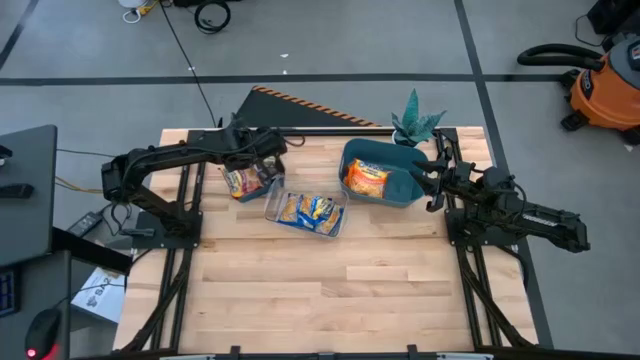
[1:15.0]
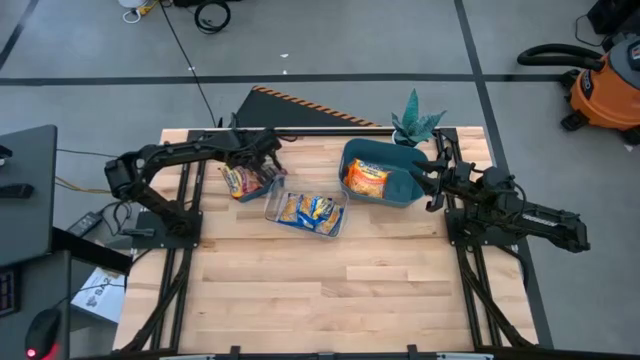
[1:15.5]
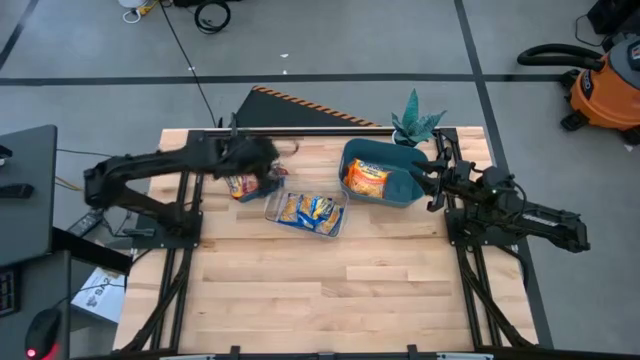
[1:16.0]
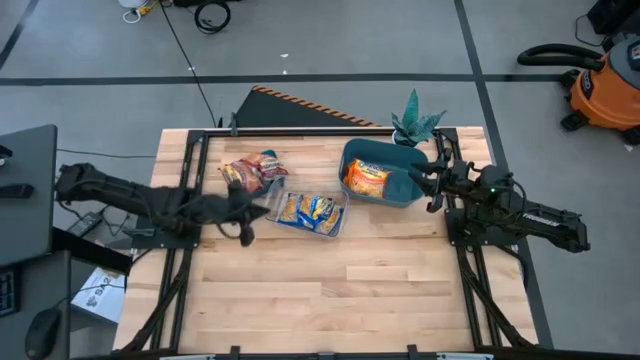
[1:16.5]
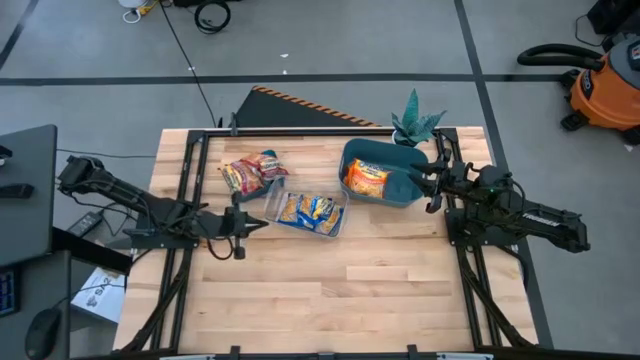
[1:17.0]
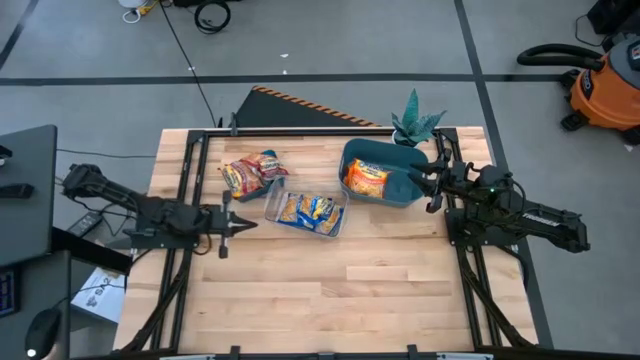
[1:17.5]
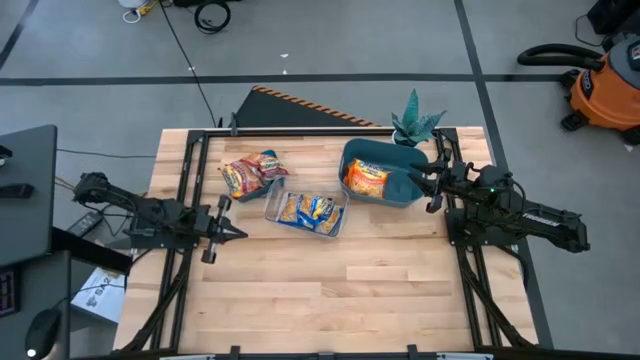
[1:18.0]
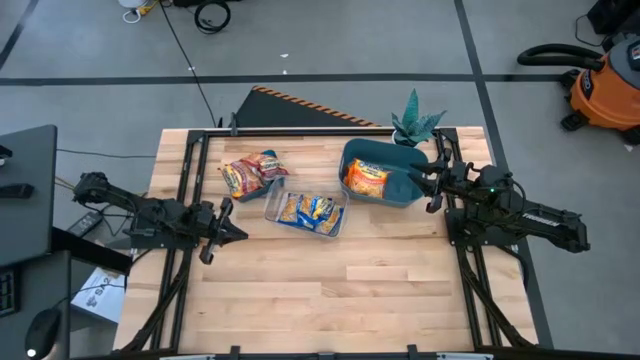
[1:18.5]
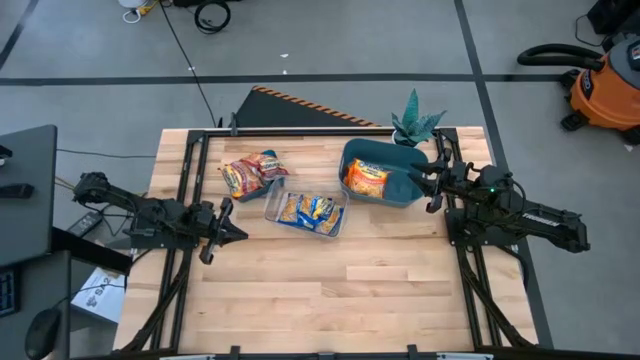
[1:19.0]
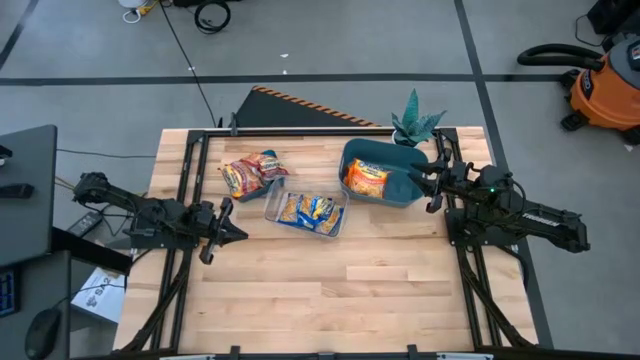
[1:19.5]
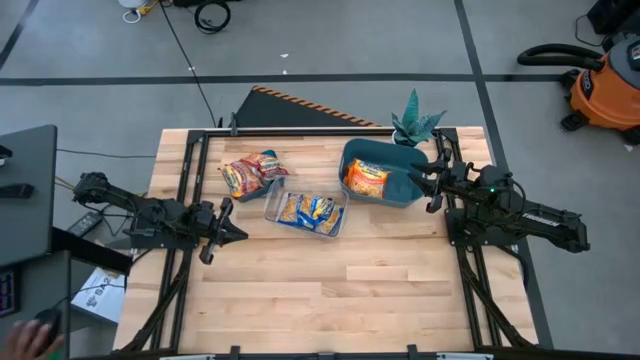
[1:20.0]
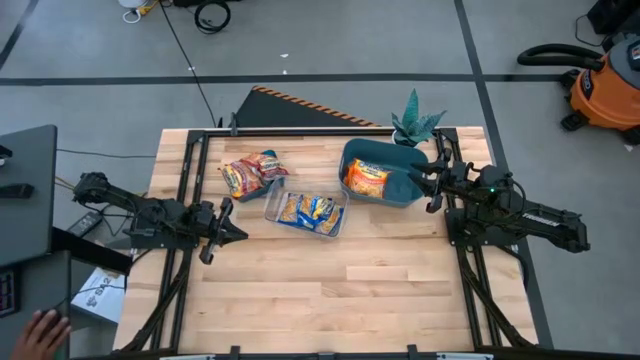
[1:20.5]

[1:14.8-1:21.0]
Task: Sort Maruchan noodles
Return to Home Position

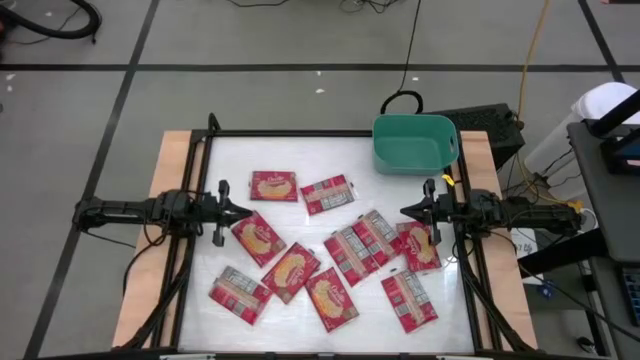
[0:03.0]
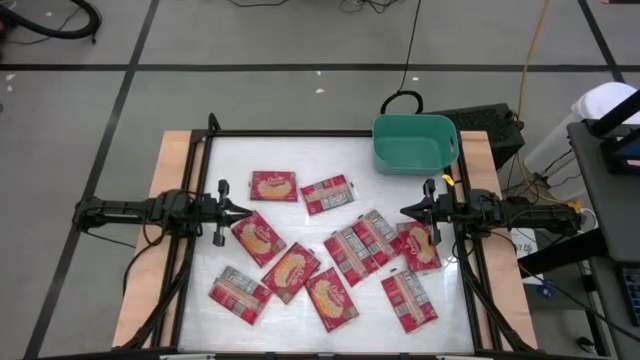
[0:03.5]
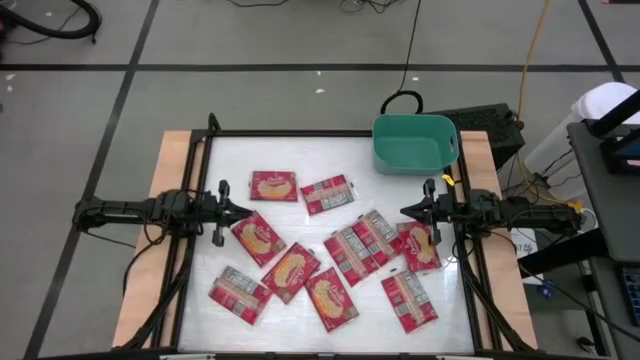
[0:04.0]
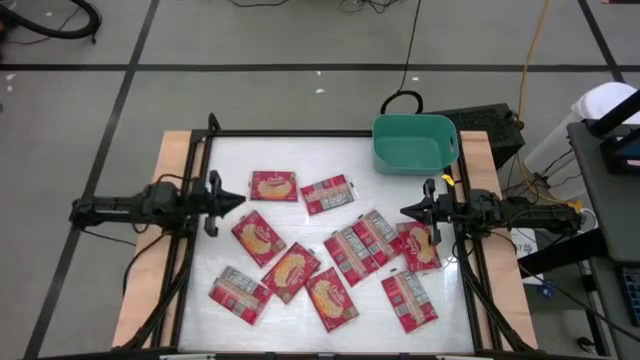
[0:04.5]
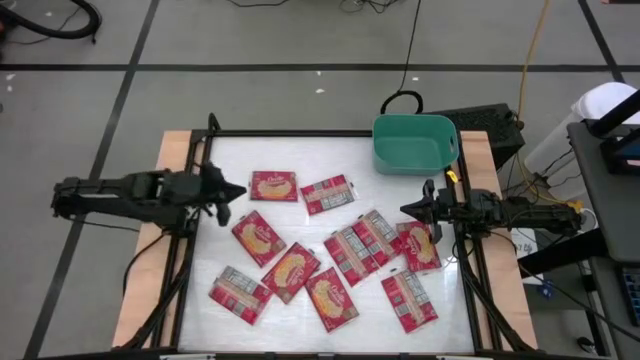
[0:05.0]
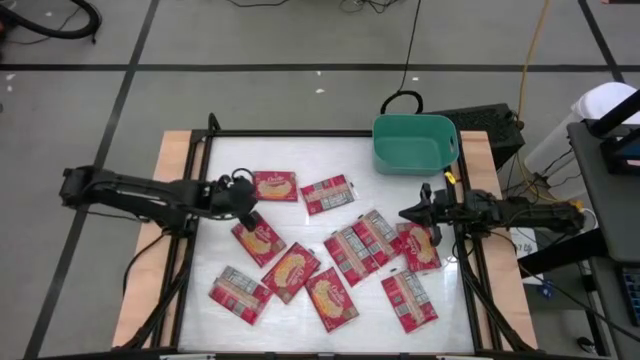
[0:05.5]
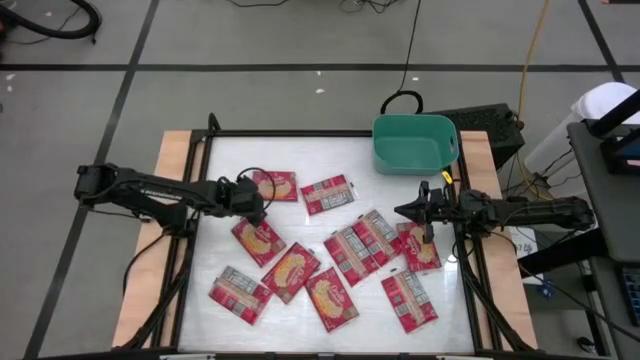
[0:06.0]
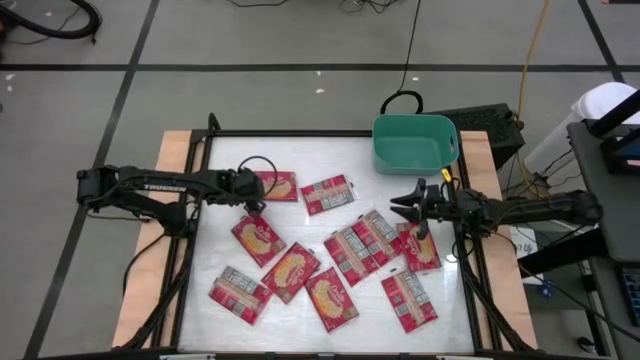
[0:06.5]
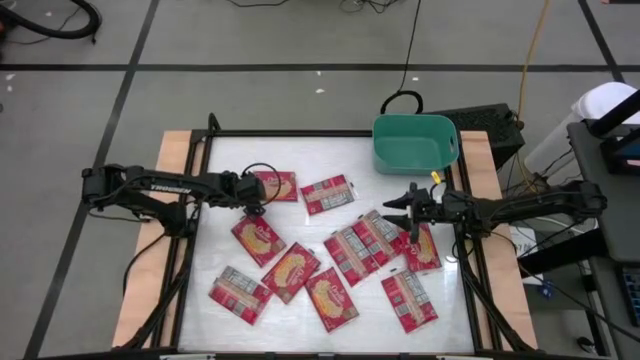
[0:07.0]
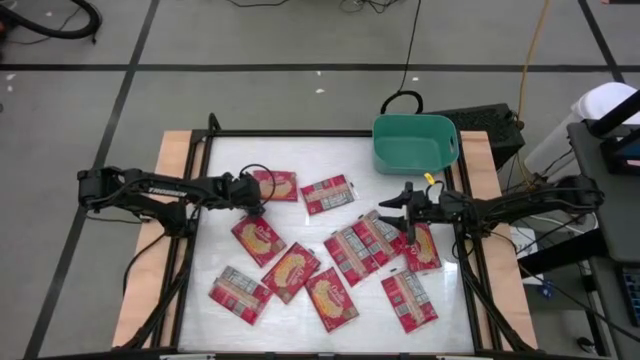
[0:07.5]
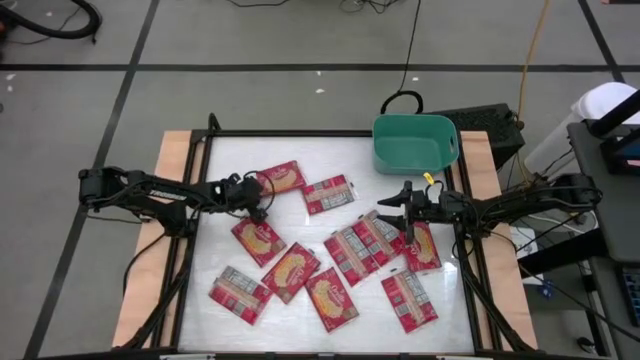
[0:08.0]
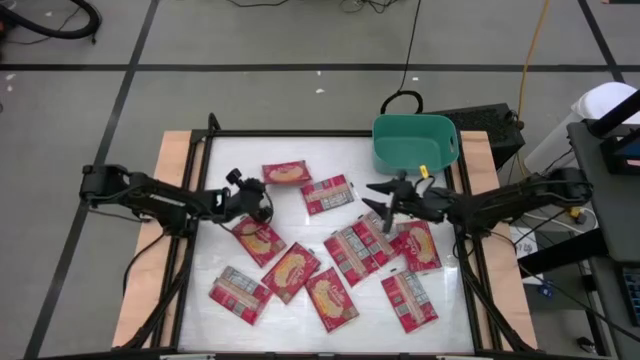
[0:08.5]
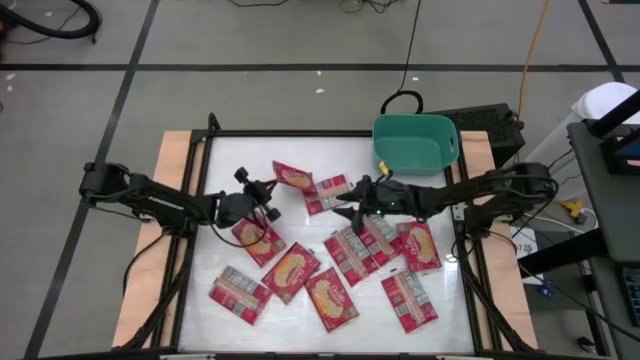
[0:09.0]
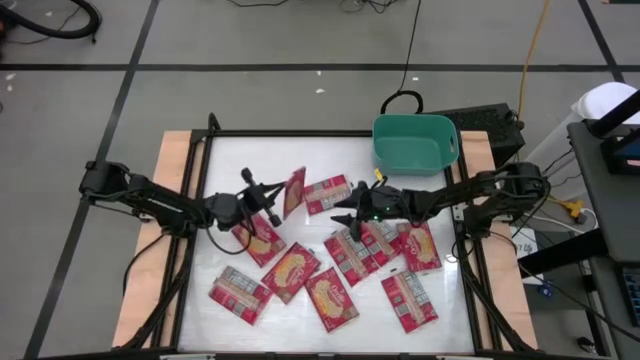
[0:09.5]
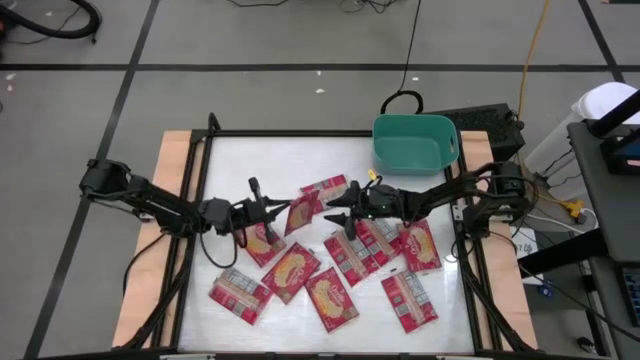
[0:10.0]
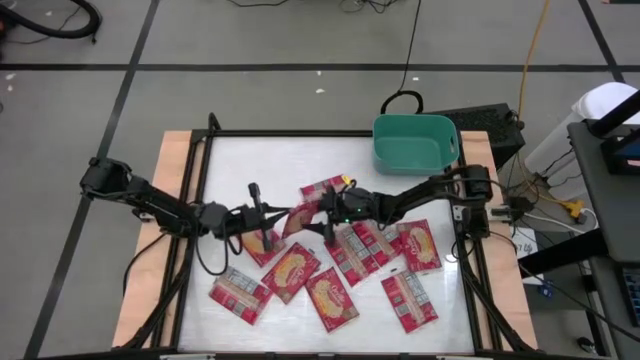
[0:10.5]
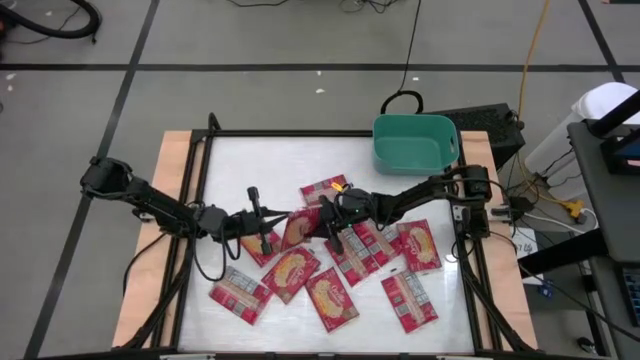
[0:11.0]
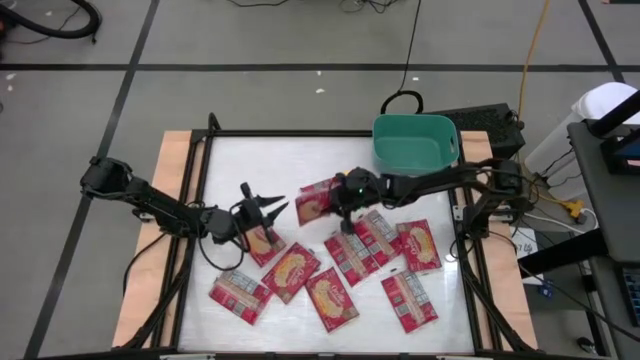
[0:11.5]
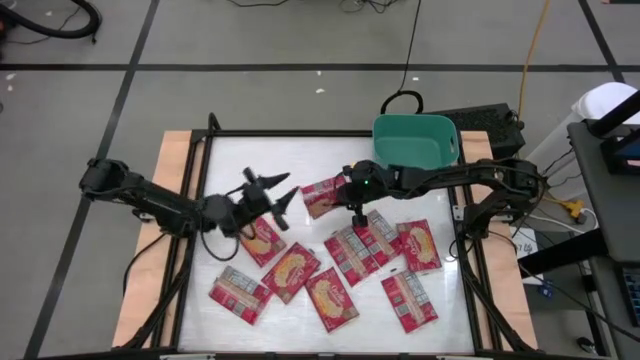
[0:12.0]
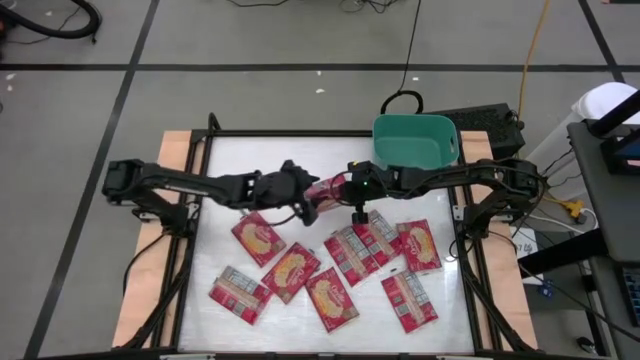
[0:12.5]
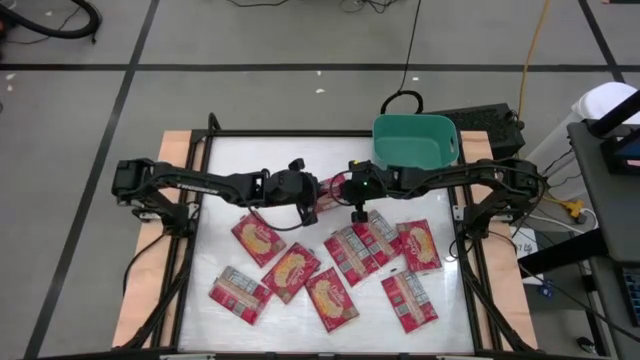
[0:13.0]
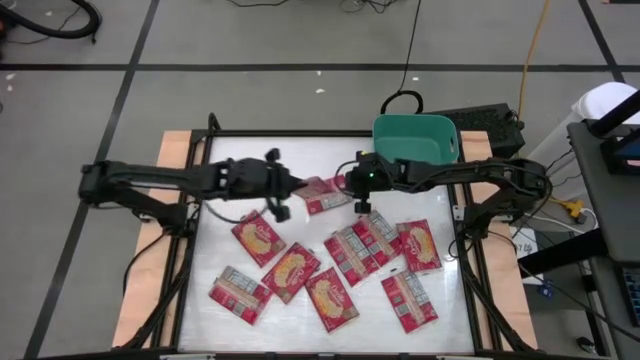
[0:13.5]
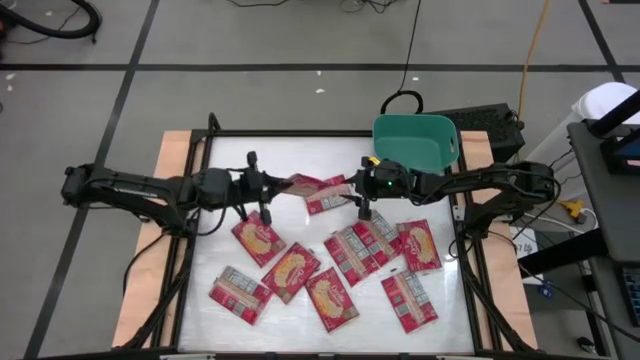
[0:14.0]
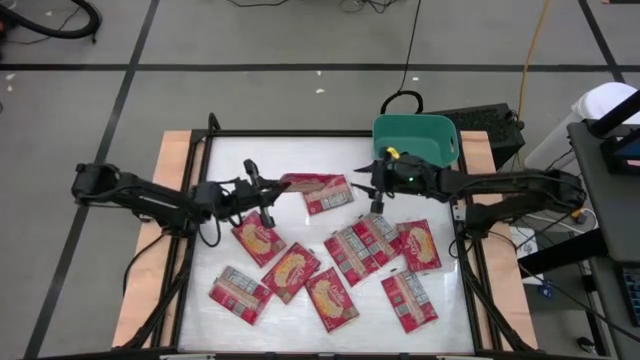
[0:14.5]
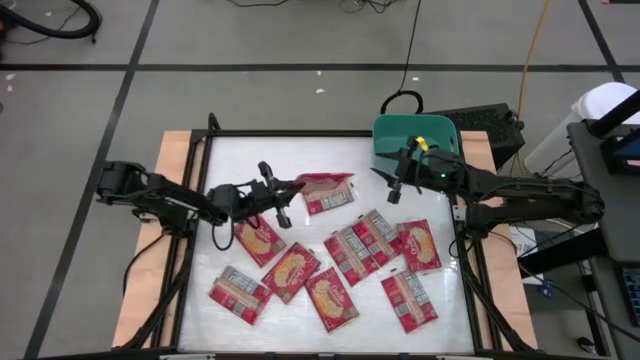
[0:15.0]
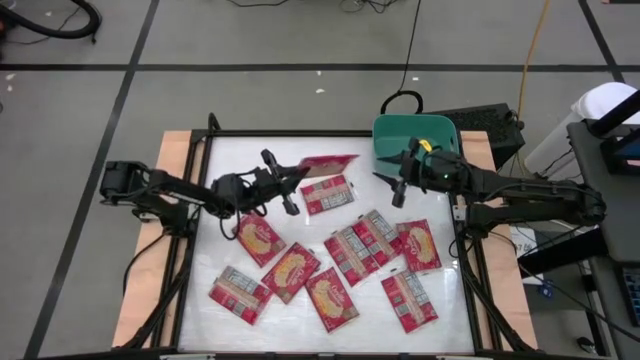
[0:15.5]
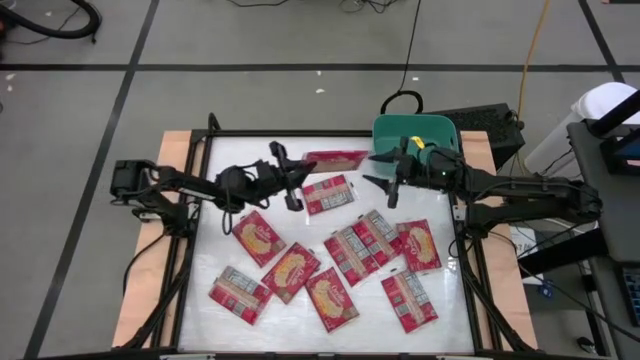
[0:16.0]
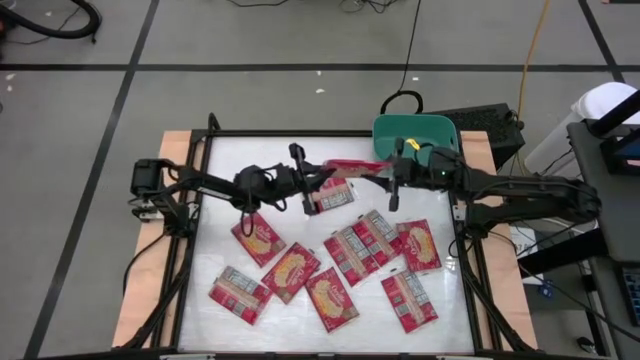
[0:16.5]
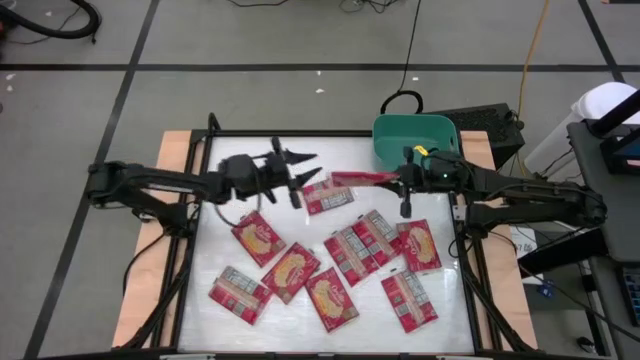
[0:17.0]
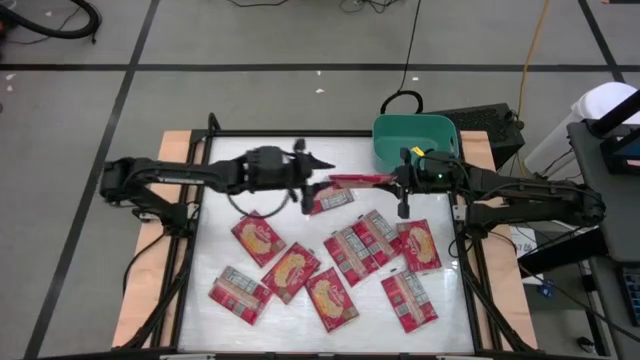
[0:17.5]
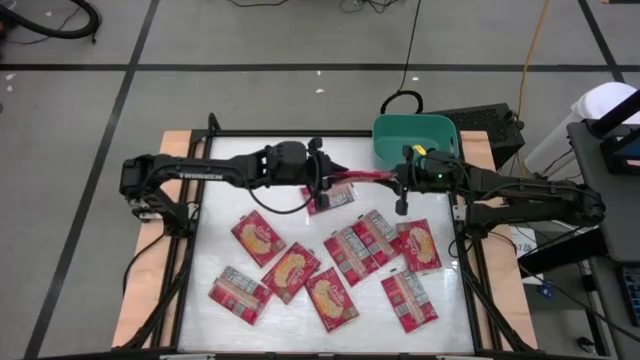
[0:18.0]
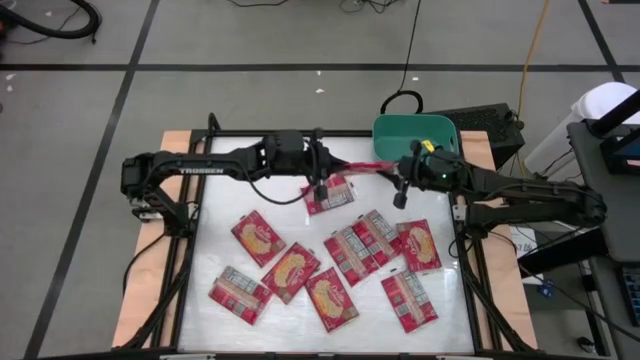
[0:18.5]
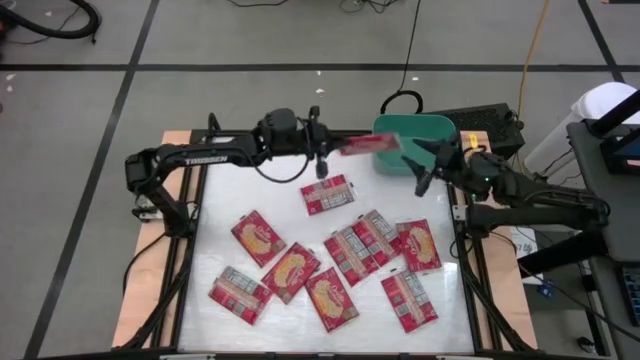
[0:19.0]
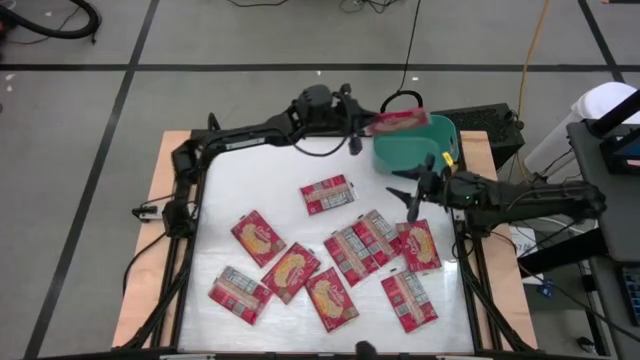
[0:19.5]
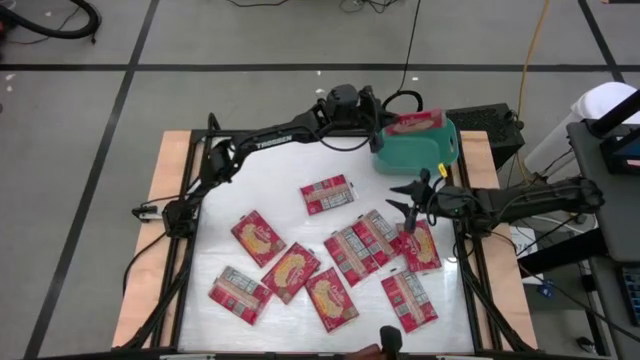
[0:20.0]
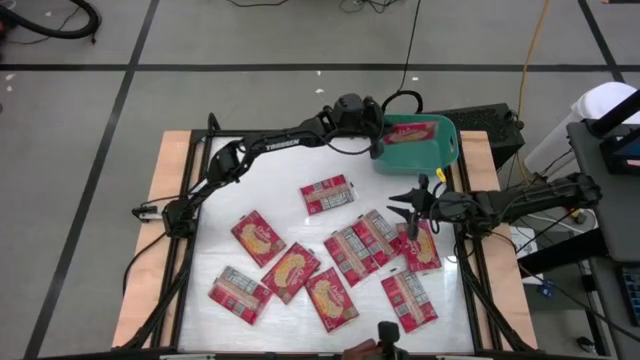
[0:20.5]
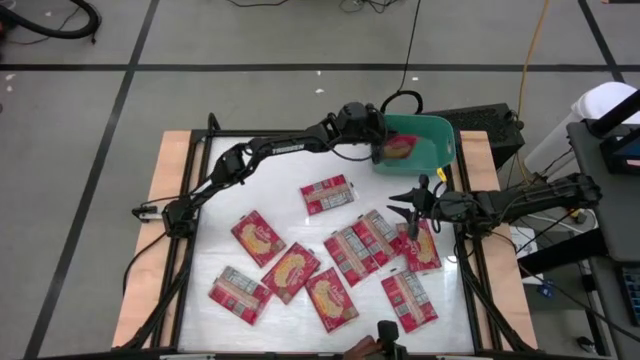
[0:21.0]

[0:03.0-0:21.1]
Task: Sort popcorn bags into baskets
Put the red popcorn bag into the green bin
